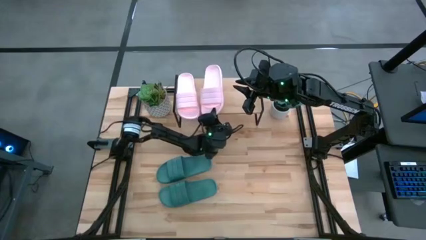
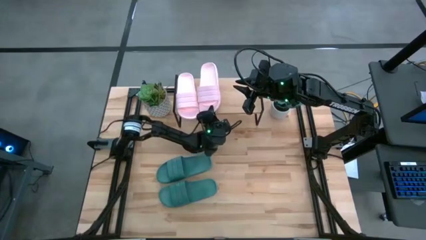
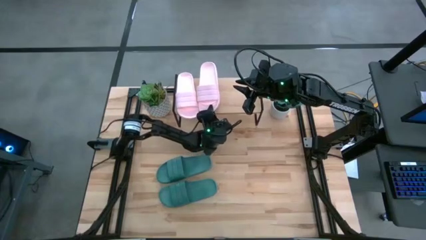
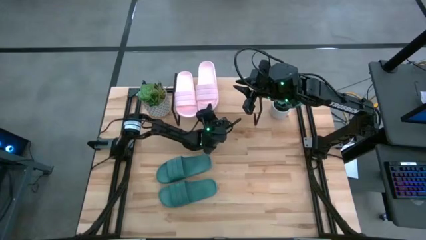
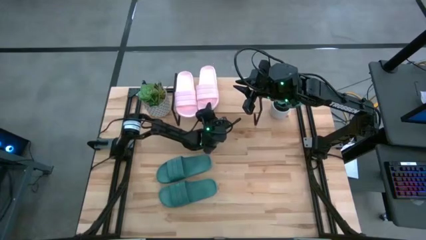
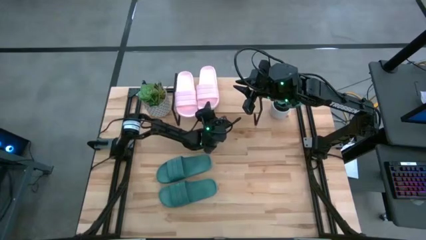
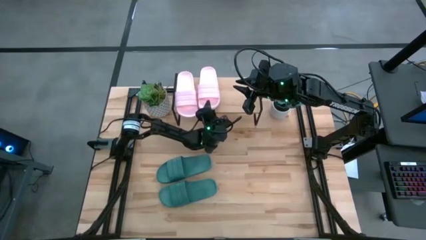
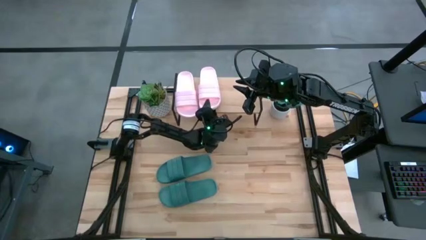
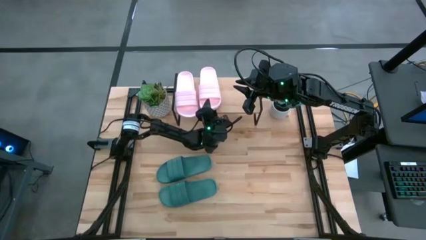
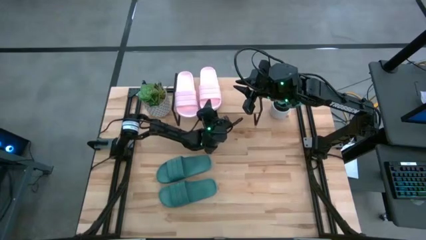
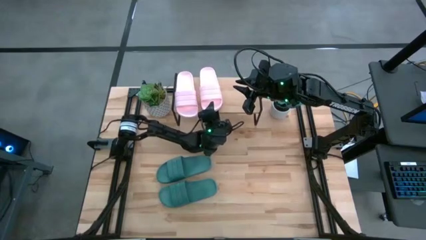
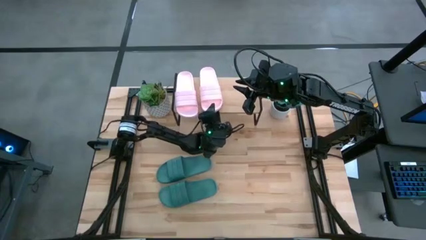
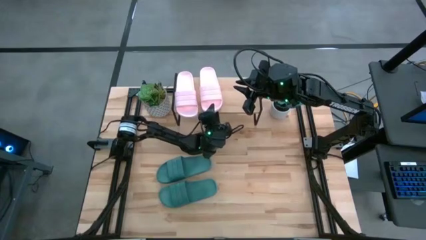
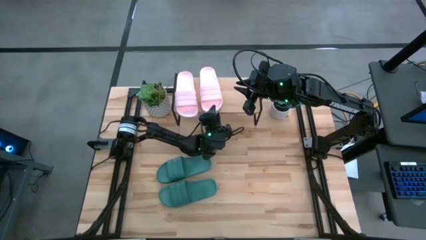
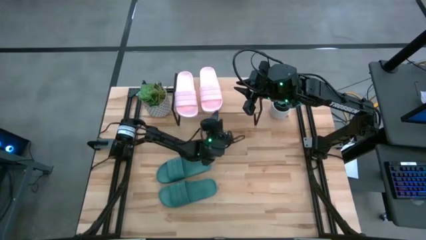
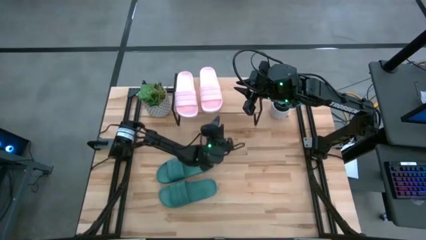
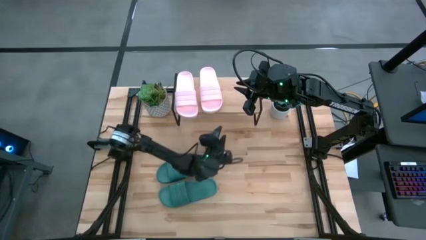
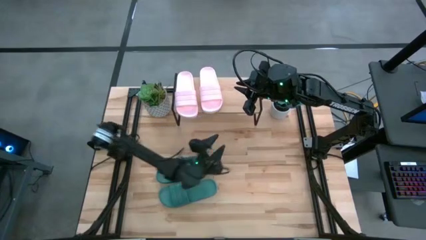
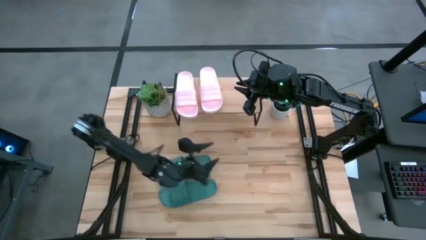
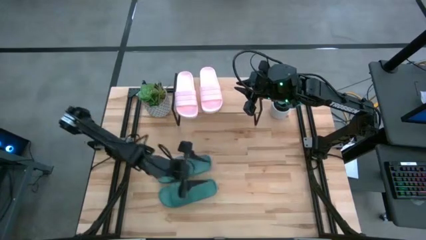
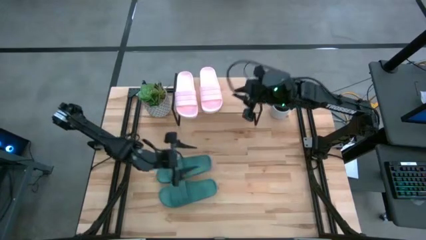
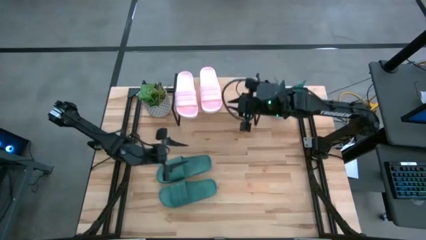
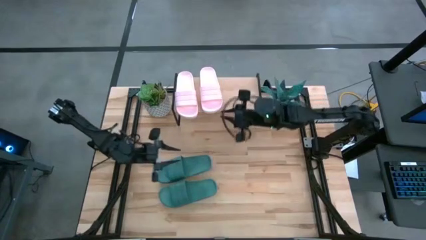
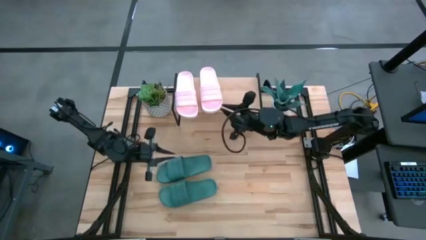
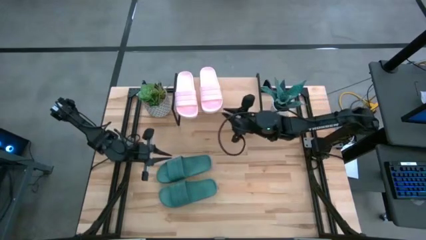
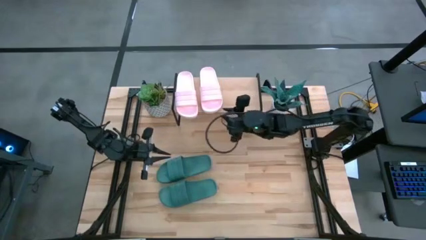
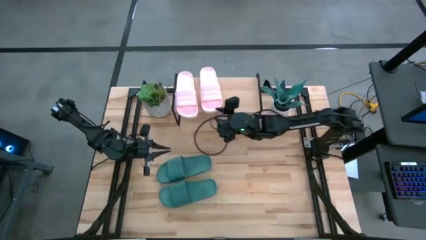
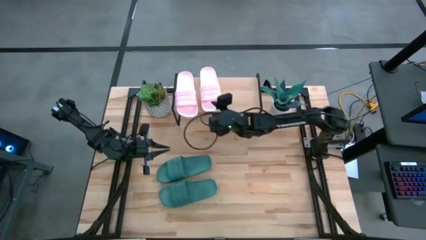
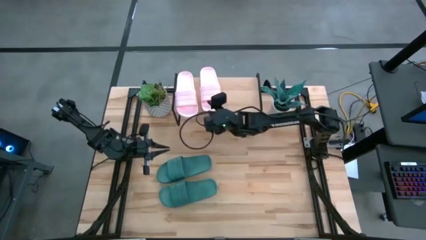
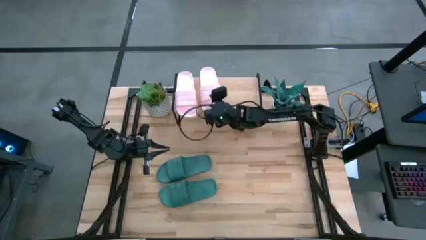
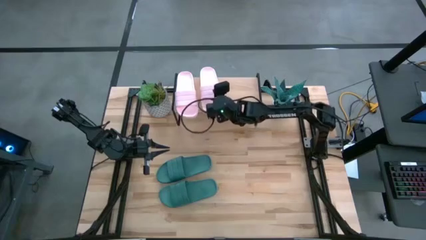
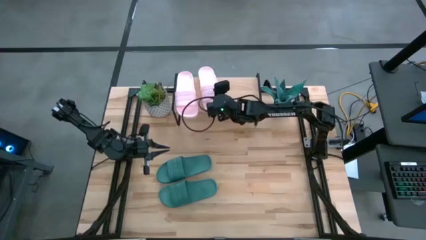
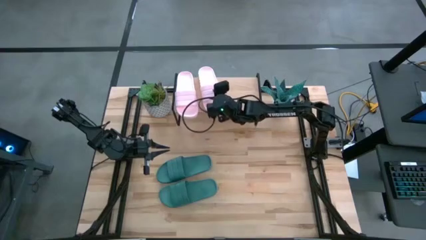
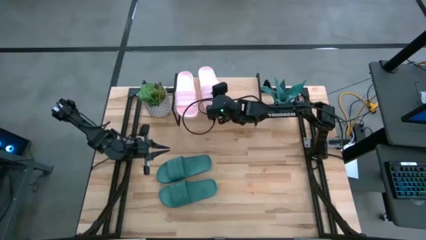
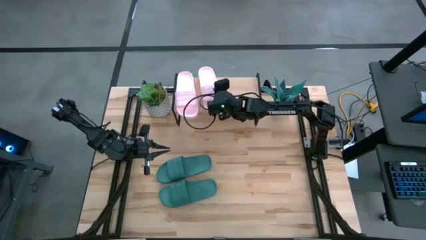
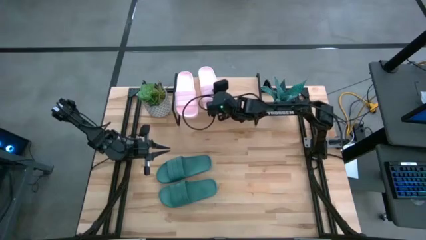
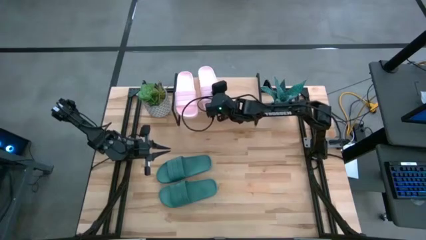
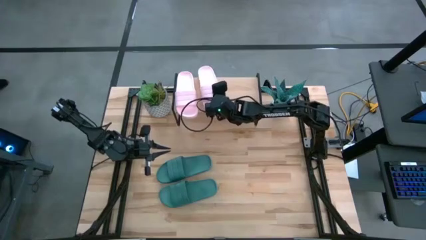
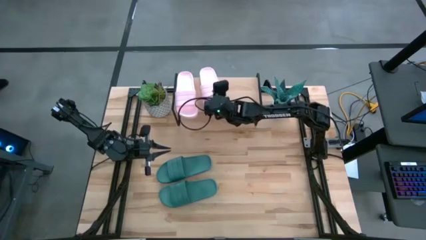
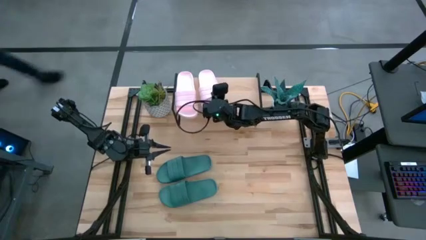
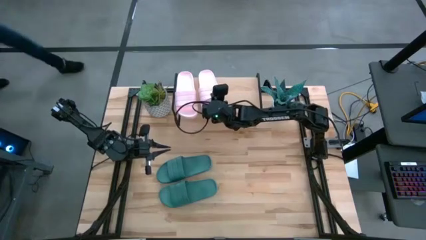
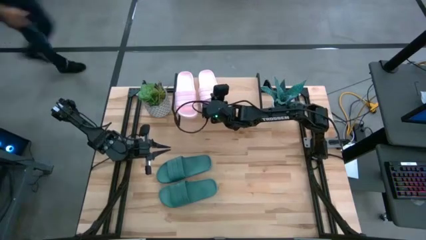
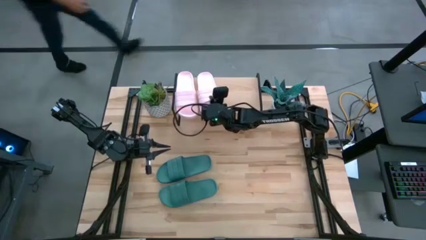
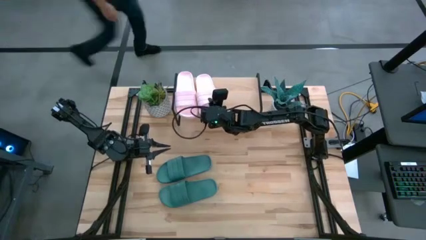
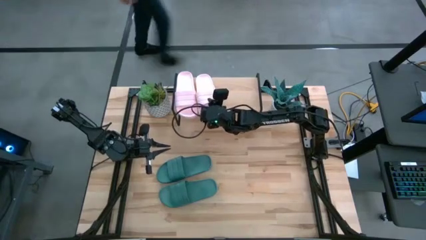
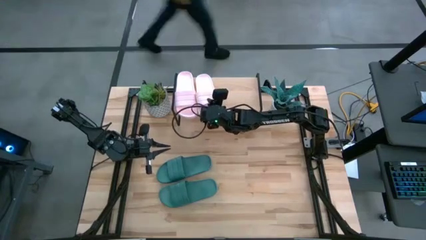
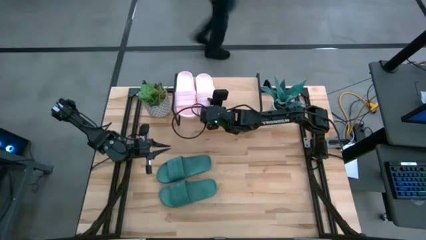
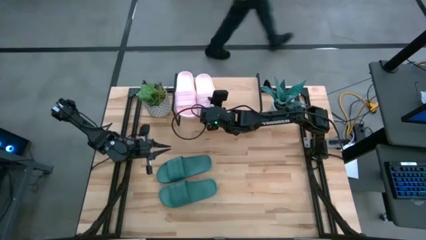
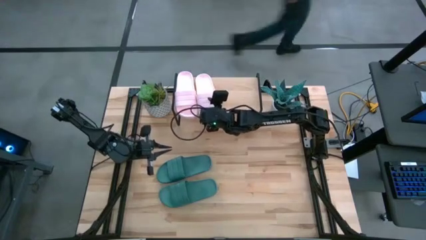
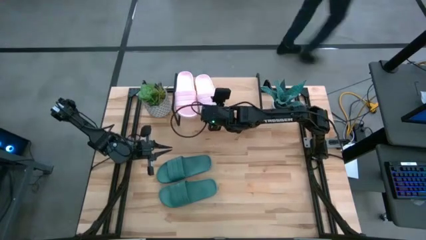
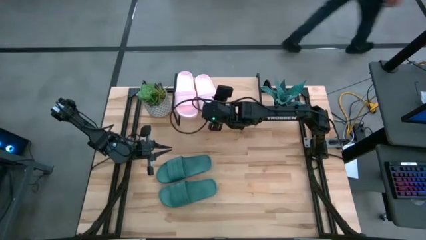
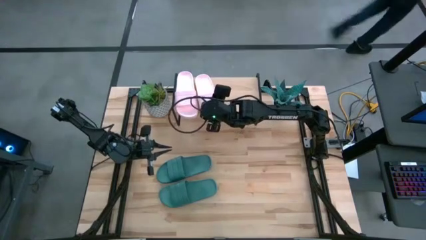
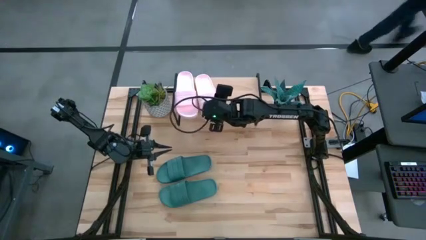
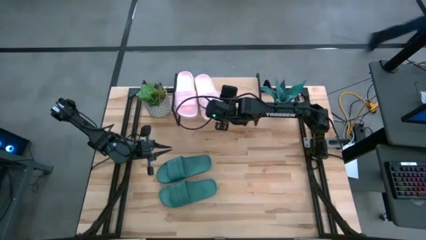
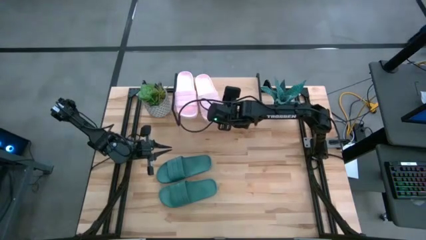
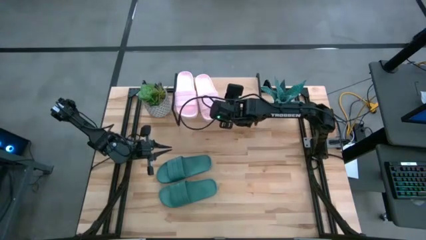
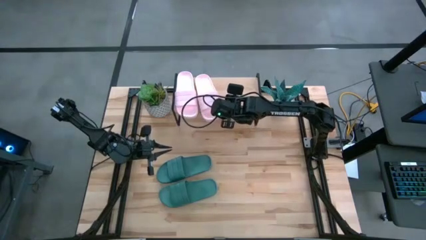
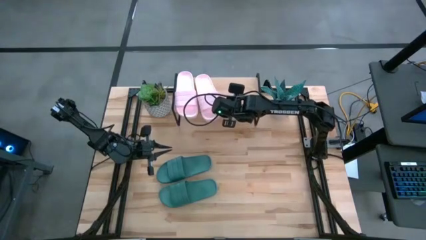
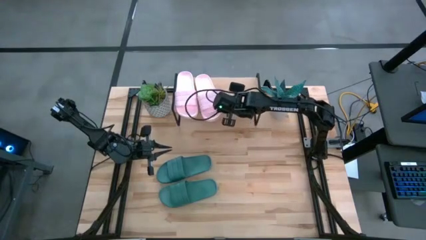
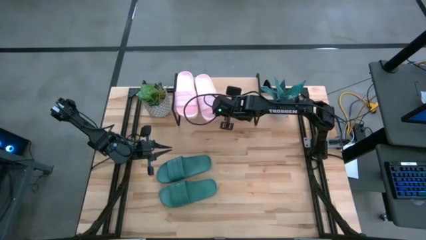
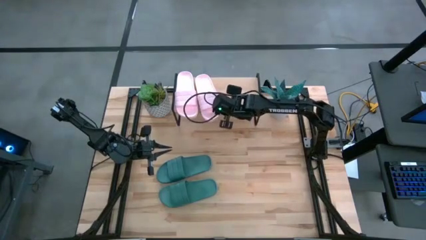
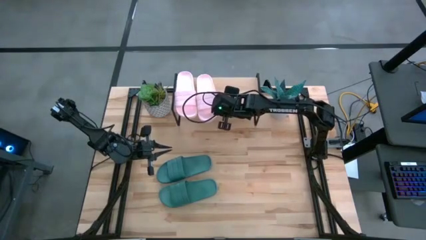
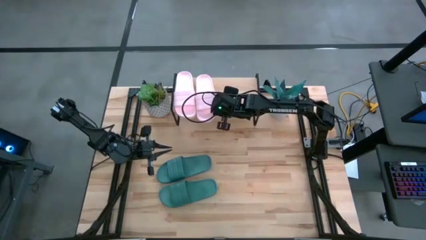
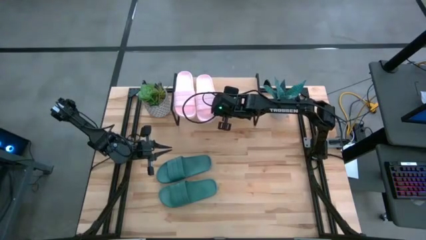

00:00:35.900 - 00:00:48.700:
Task: Pick and place slides into the shelf
Put the pink slipper on the shelf
